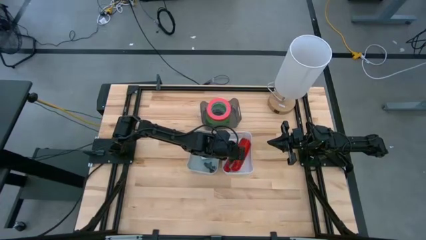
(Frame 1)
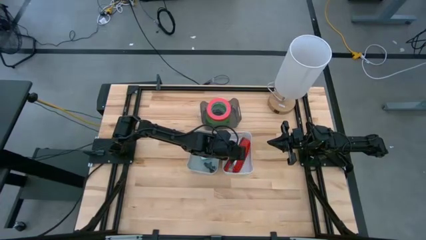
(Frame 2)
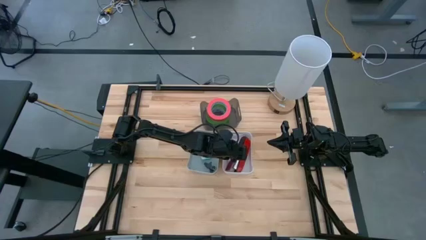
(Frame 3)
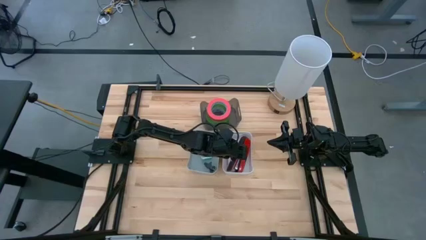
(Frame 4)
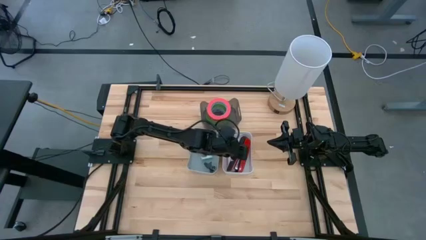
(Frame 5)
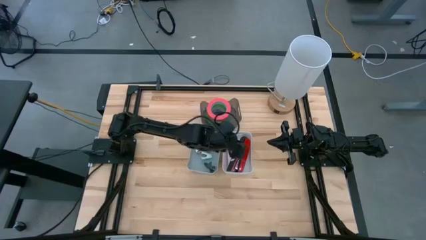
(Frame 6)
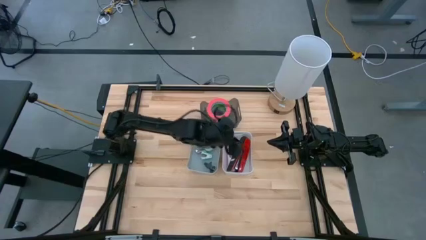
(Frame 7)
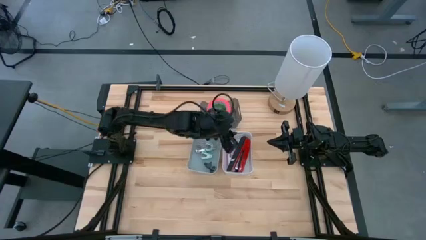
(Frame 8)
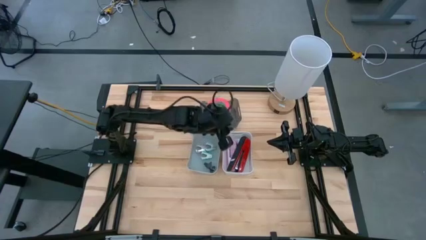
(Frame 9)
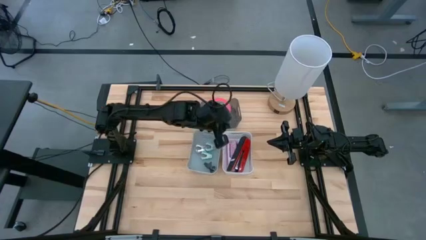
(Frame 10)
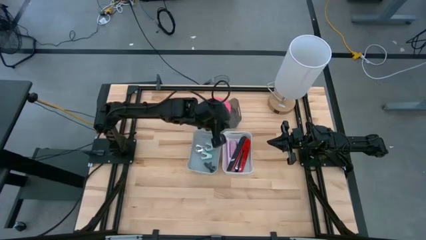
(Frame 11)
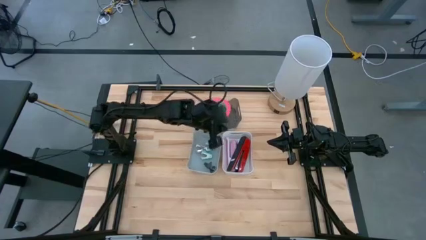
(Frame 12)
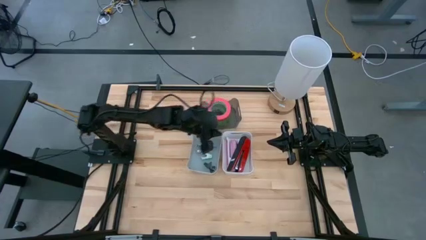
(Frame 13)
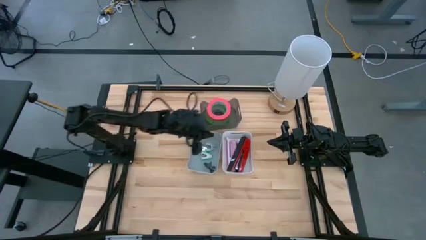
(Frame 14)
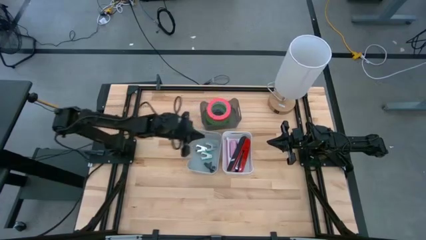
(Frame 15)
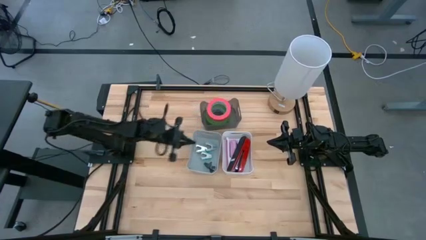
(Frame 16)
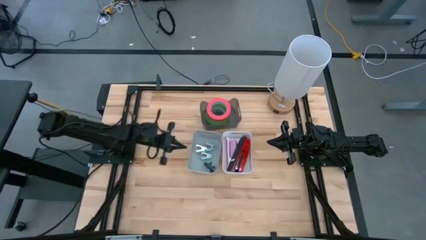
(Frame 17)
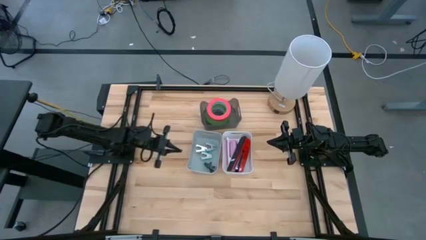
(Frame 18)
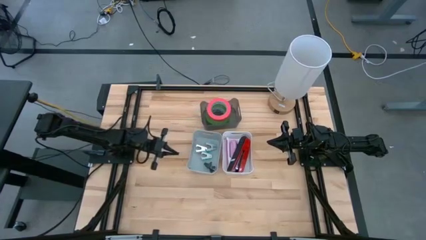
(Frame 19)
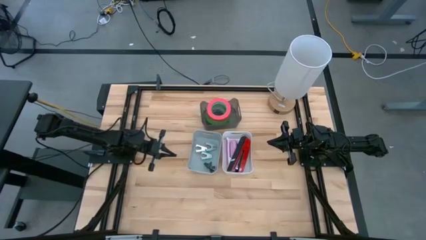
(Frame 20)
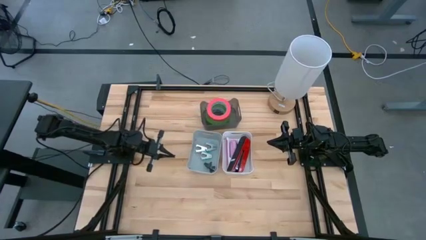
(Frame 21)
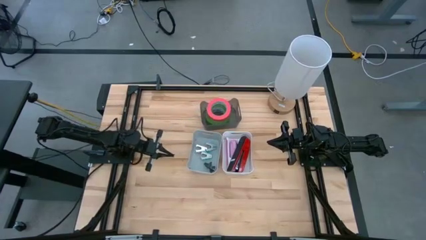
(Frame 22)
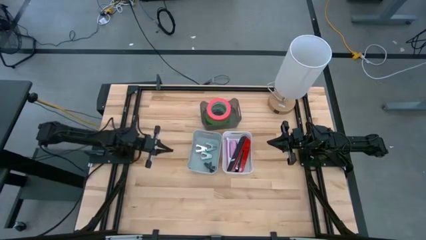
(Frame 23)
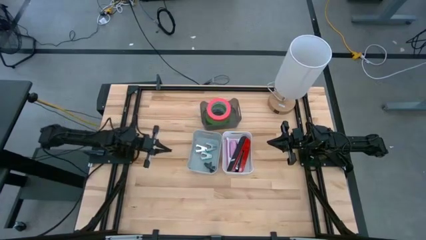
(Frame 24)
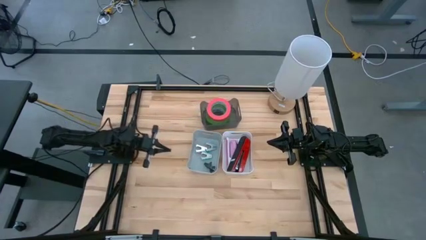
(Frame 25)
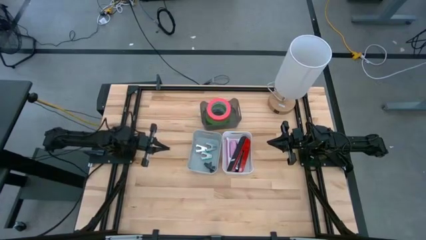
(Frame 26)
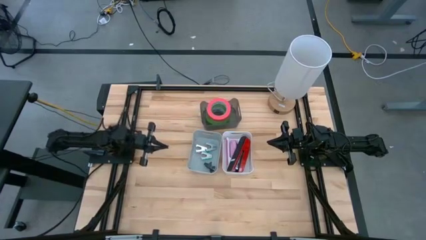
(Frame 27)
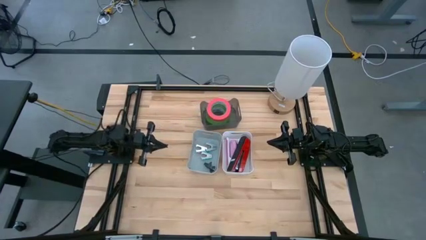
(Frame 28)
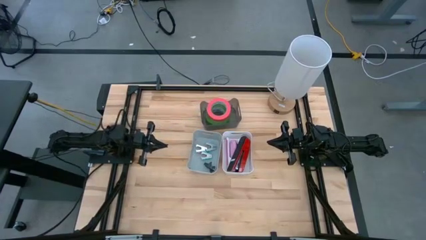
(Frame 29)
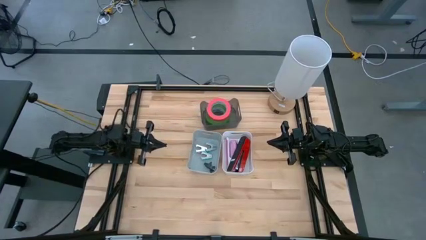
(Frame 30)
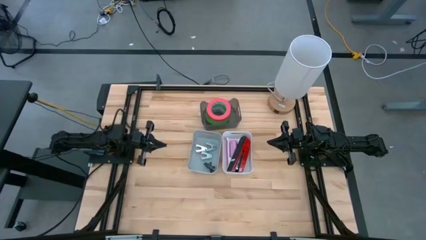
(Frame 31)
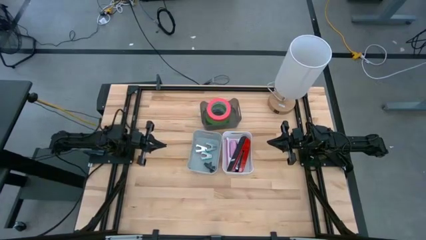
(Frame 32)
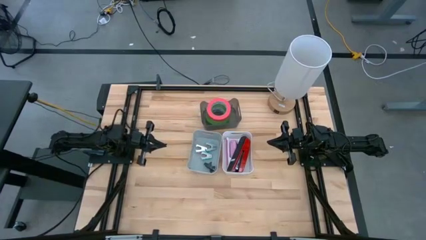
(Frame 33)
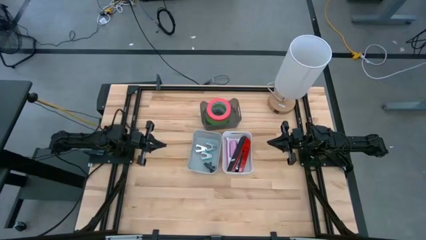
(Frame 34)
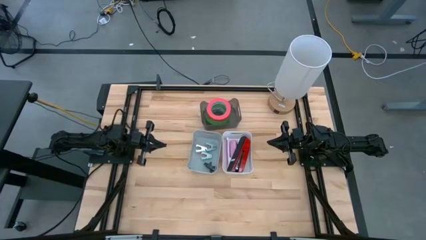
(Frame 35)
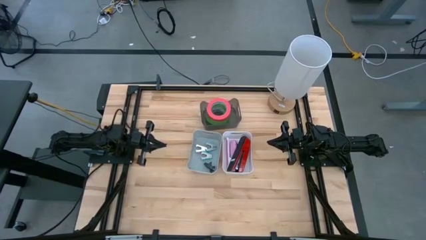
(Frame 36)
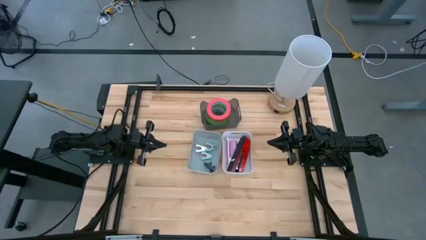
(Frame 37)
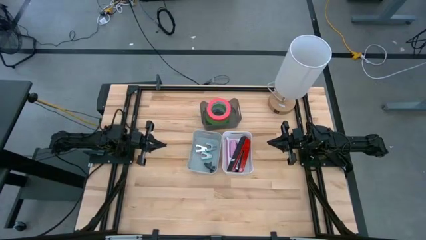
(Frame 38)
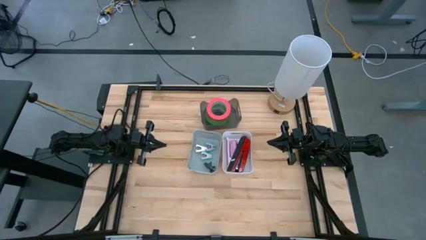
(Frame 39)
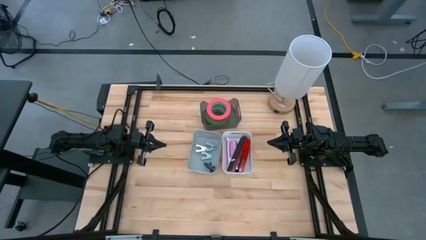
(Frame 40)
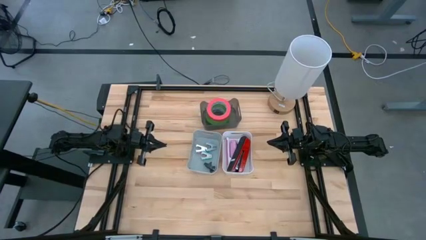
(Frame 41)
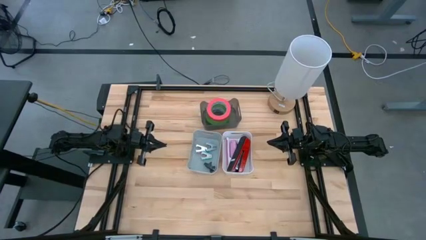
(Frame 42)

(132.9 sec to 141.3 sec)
Task: Pick and place Stapler, Stapler remover, tape
Return to Home Position

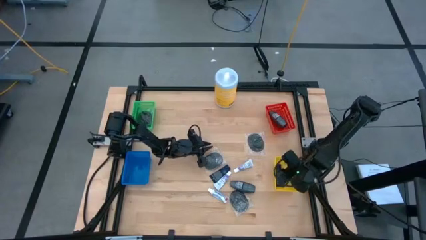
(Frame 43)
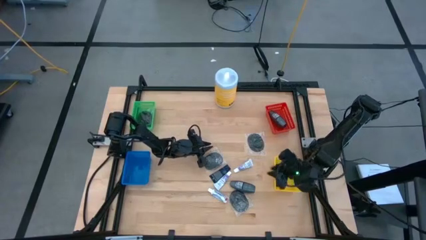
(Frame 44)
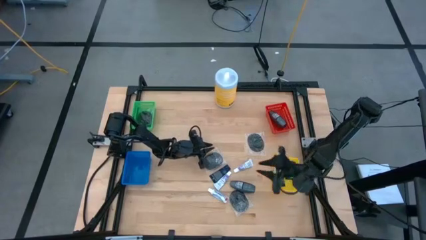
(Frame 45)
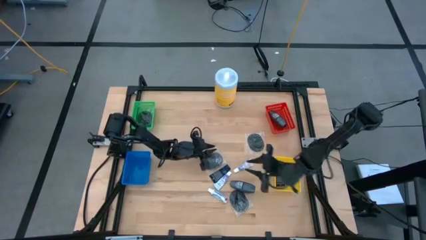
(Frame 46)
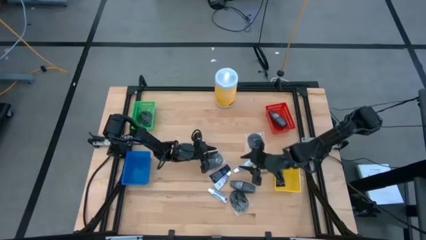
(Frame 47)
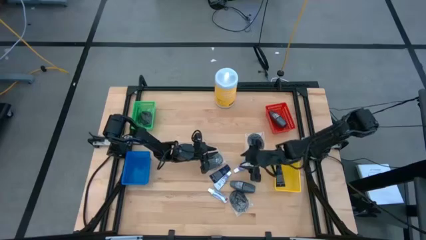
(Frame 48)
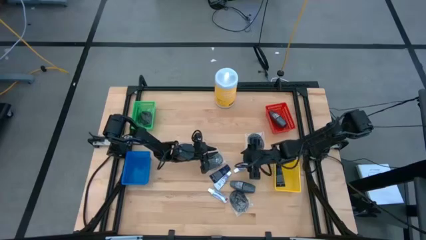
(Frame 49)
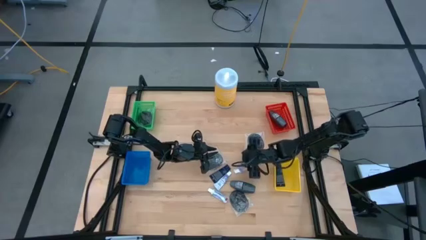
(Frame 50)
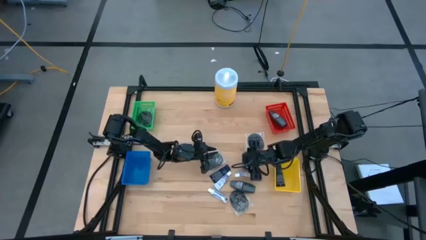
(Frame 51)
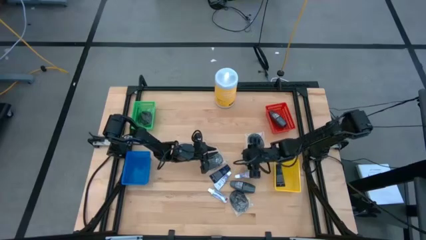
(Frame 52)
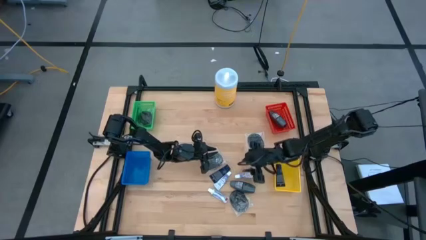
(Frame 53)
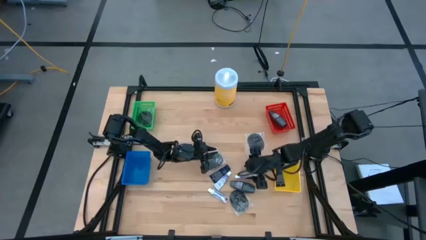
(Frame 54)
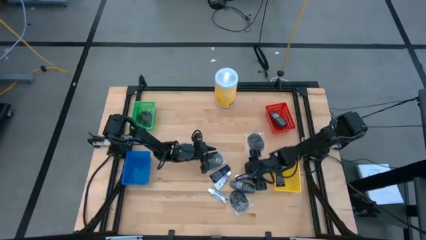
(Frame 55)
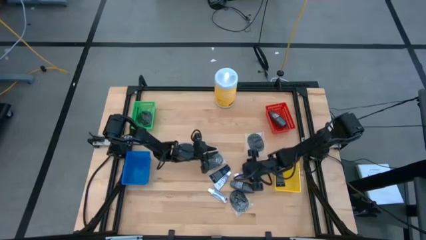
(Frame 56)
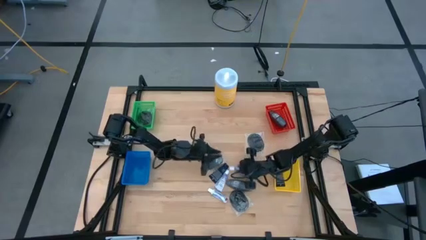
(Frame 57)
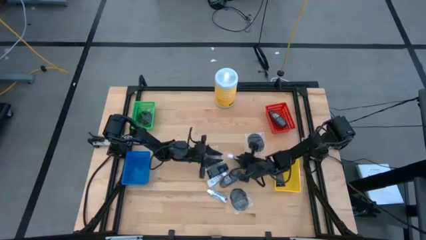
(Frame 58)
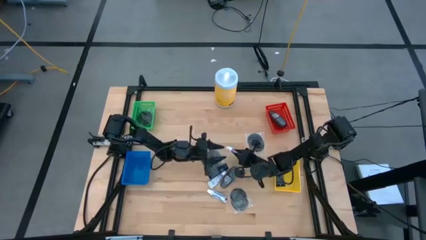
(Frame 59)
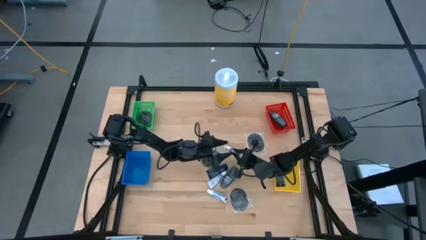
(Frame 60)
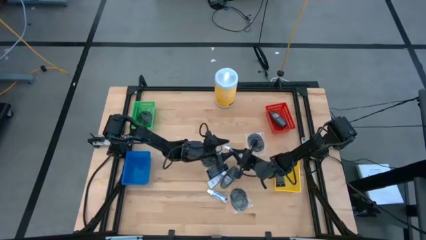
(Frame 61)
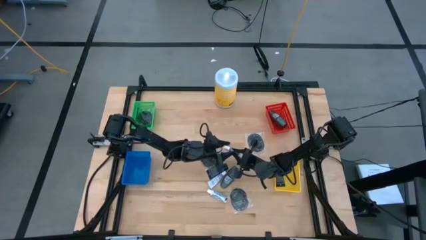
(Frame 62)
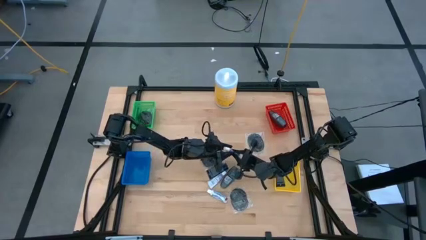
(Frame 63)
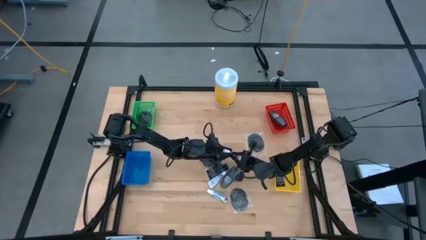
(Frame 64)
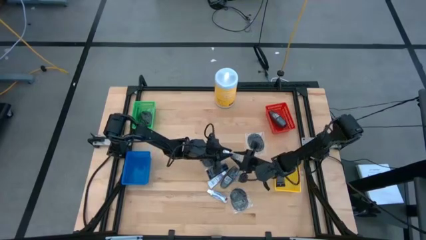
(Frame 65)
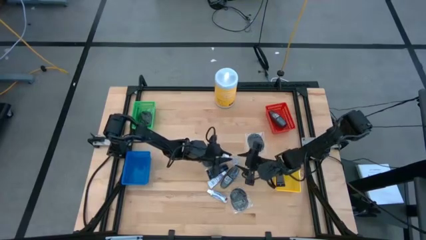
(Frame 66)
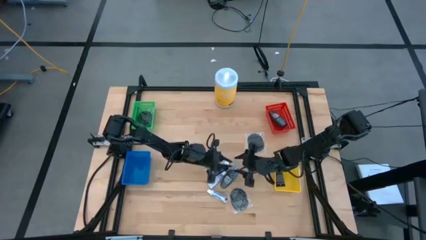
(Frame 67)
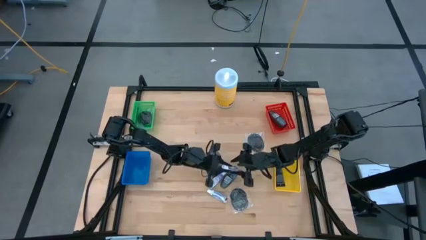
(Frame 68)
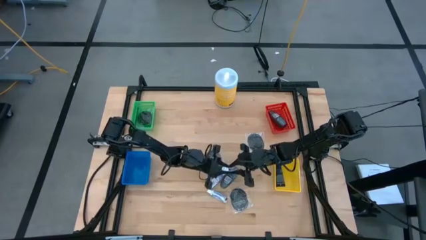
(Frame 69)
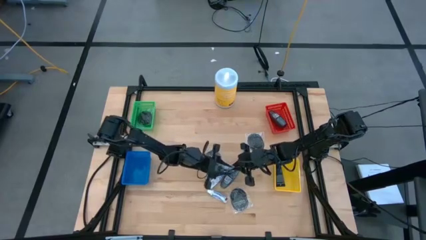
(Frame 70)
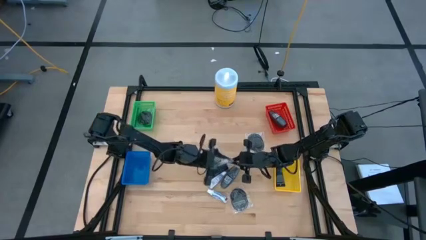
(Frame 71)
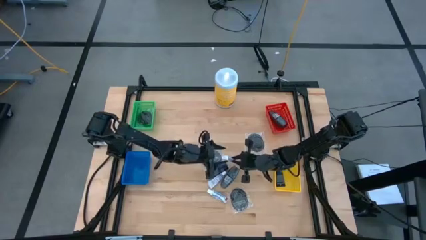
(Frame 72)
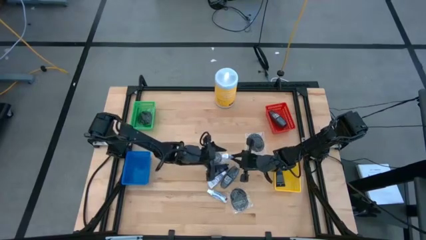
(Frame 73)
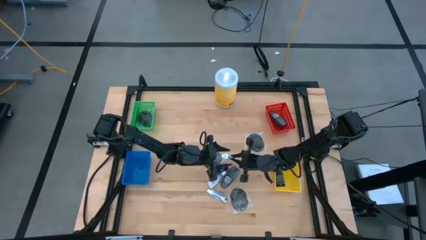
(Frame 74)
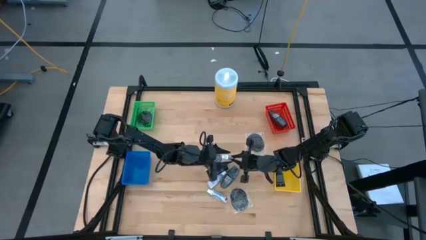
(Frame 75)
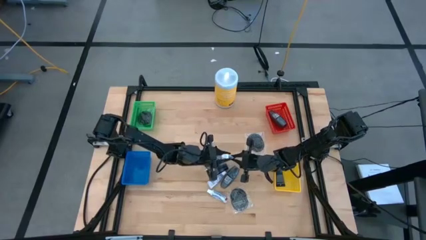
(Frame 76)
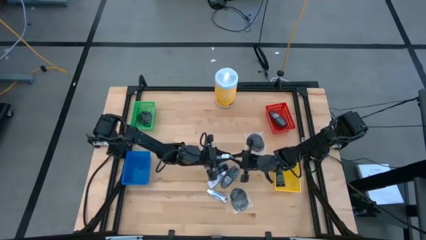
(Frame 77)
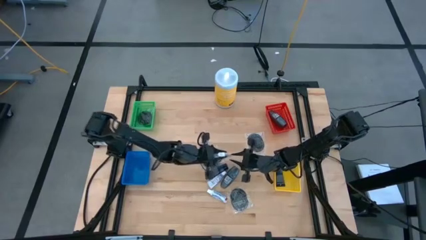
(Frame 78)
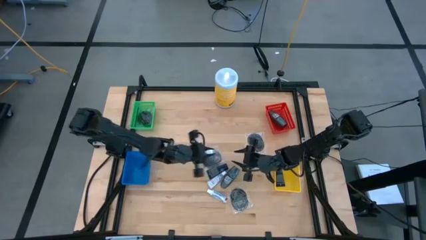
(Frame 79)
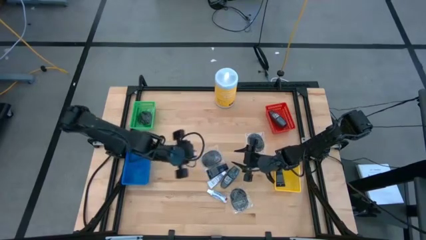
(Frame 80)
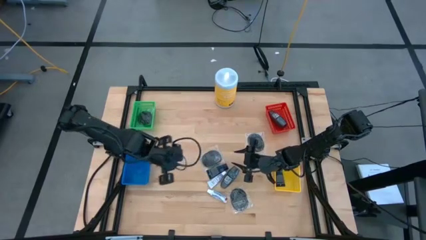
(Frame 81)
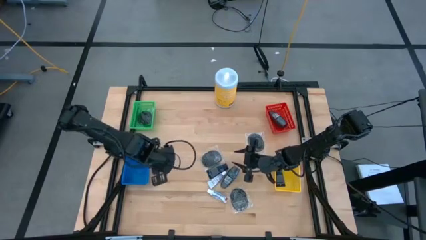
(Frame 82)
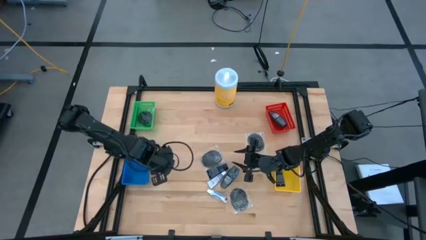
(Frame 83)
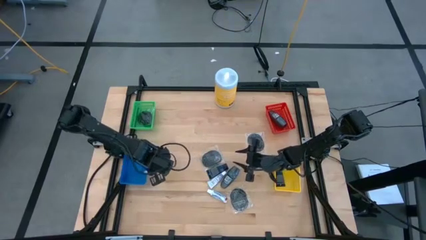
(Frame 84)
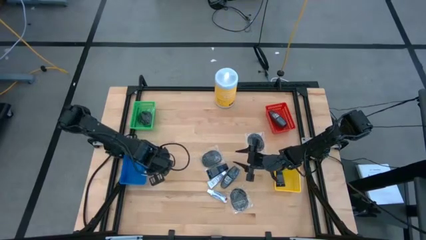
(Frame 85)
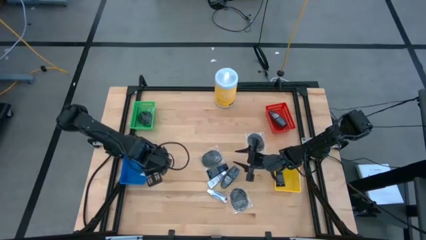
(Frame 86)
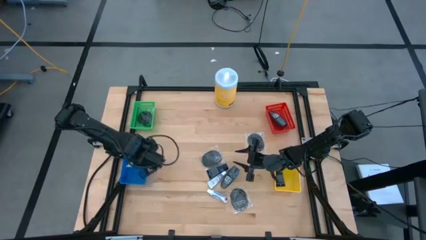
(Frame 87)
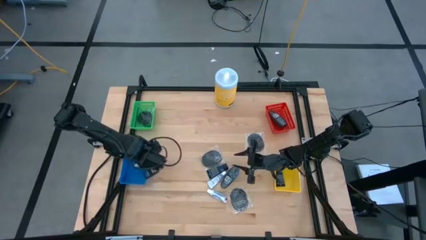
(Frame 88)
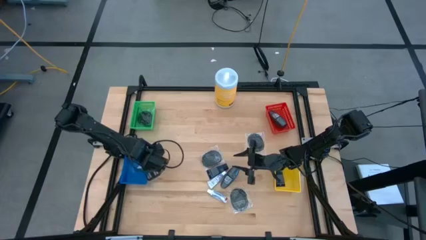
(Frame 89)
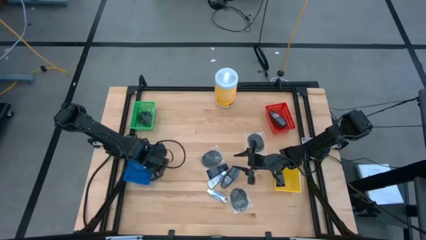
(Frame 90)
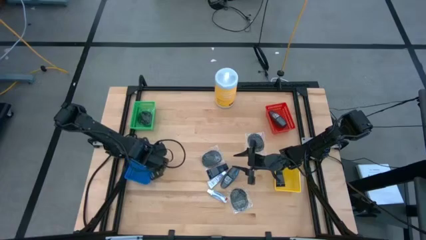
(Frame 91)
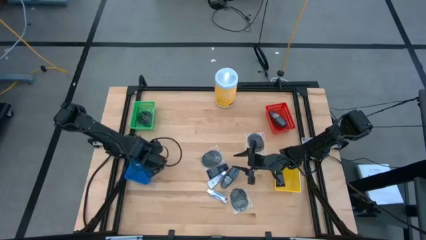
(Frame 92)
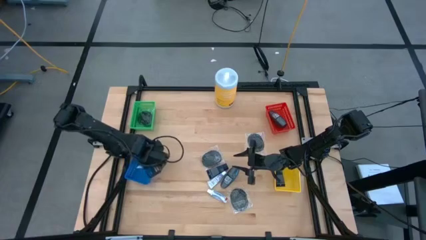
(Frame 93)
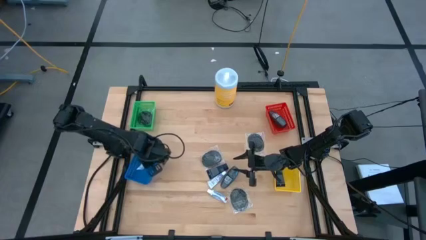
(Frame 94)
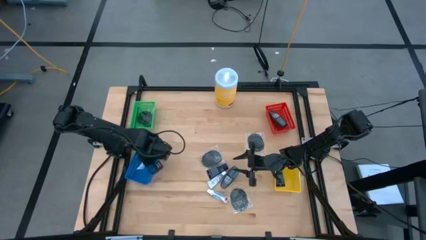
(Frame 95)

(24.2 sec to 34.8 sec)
Task: Pick & Place Travel size toiletries
Put the toothpaste into the blue bin
